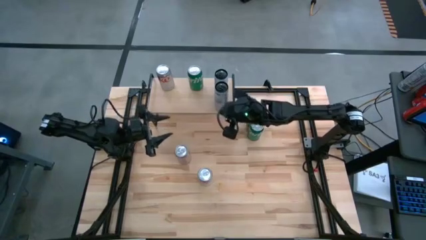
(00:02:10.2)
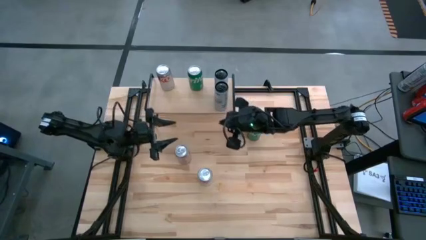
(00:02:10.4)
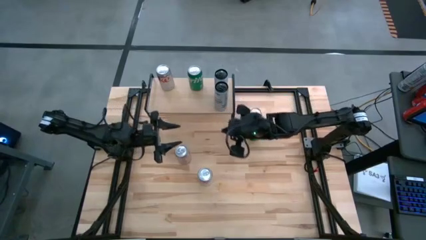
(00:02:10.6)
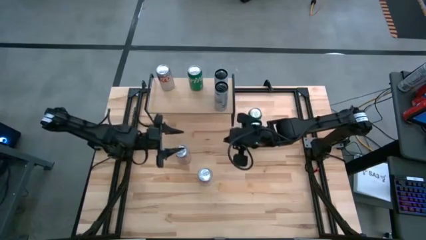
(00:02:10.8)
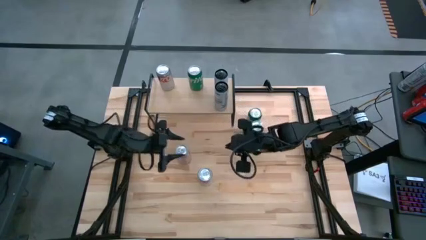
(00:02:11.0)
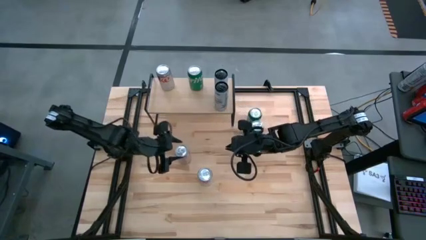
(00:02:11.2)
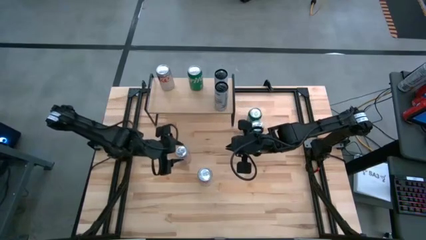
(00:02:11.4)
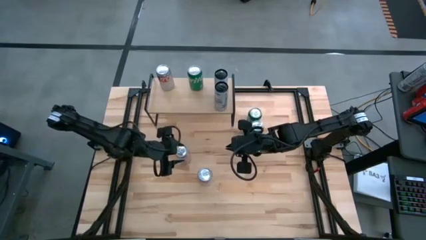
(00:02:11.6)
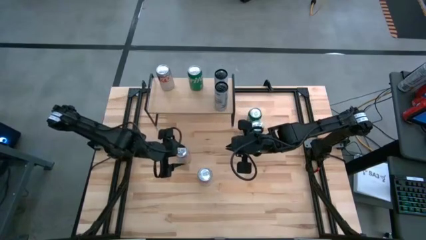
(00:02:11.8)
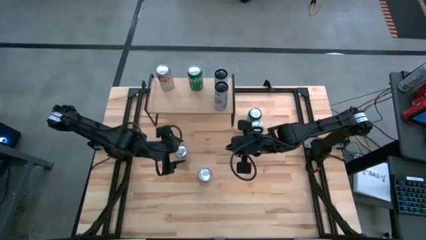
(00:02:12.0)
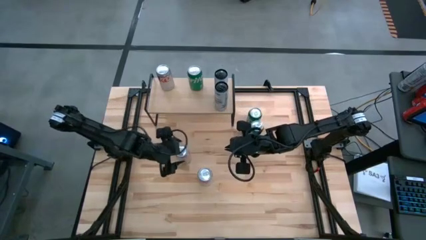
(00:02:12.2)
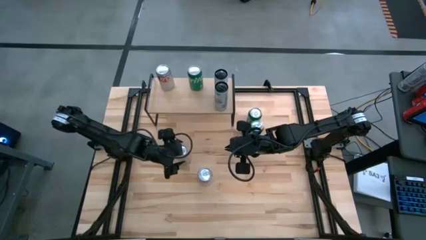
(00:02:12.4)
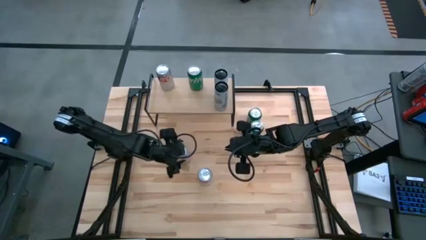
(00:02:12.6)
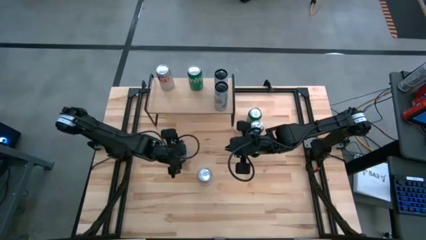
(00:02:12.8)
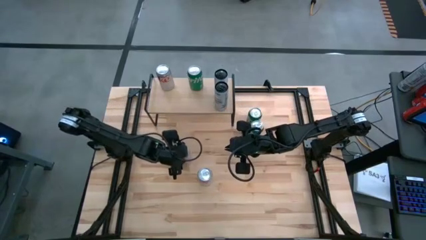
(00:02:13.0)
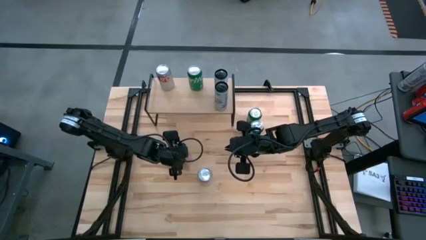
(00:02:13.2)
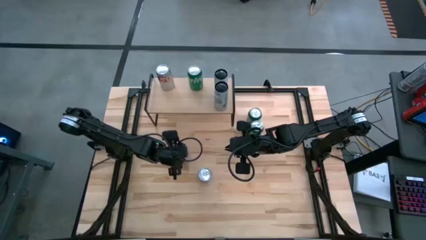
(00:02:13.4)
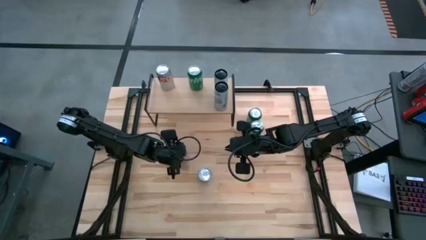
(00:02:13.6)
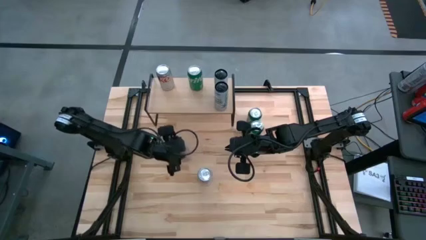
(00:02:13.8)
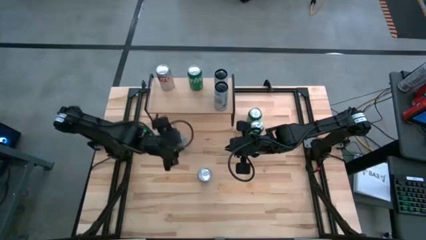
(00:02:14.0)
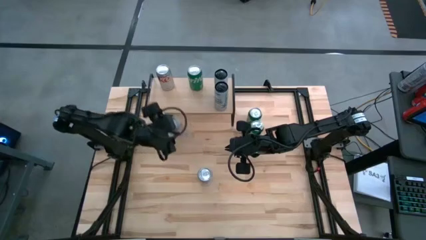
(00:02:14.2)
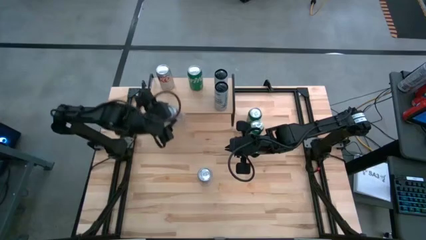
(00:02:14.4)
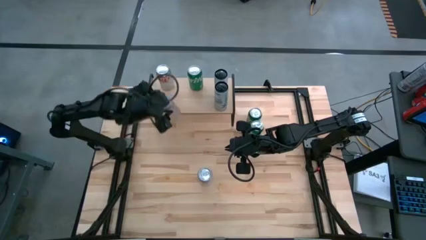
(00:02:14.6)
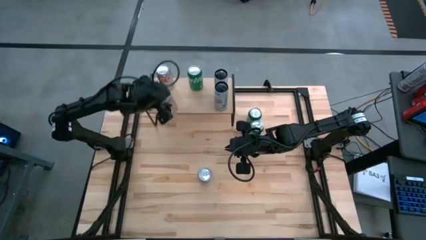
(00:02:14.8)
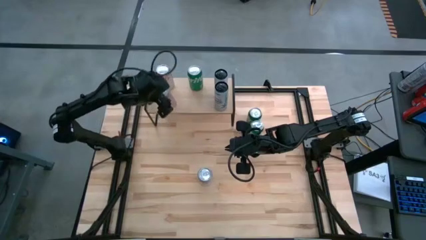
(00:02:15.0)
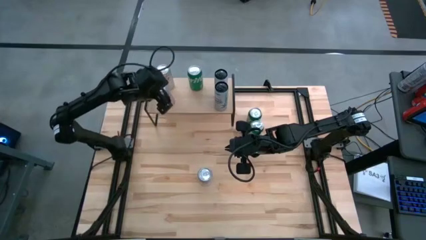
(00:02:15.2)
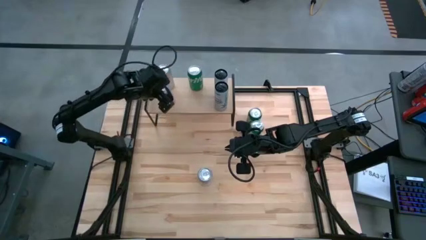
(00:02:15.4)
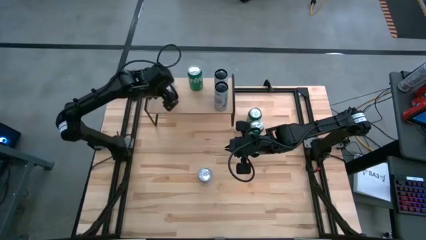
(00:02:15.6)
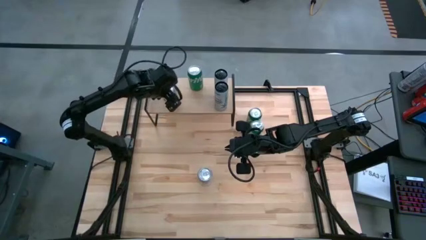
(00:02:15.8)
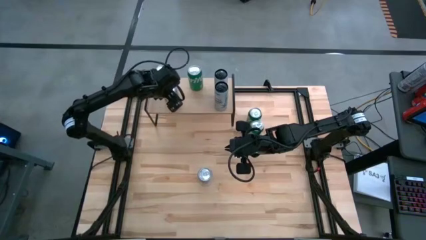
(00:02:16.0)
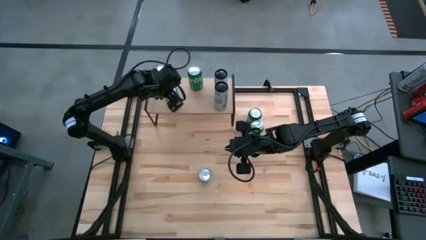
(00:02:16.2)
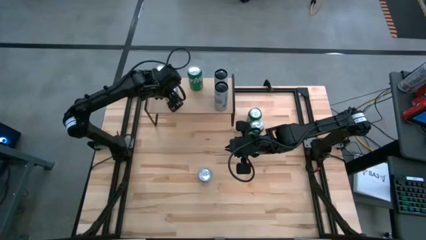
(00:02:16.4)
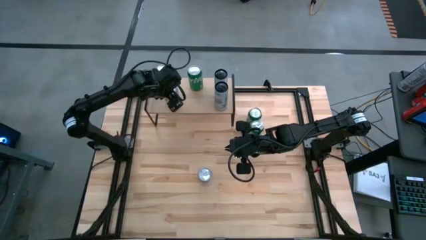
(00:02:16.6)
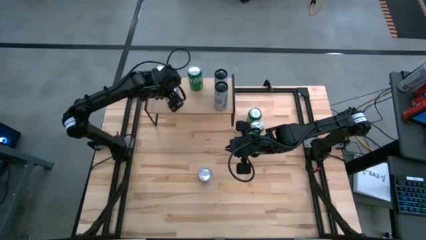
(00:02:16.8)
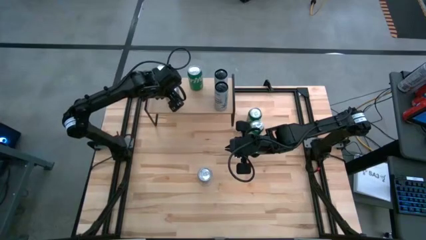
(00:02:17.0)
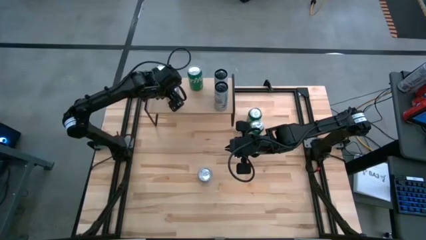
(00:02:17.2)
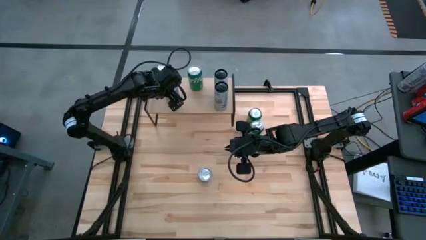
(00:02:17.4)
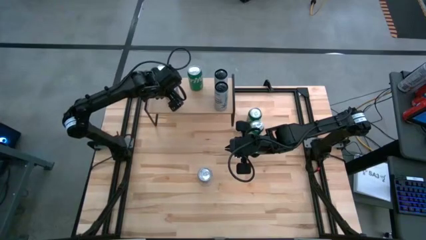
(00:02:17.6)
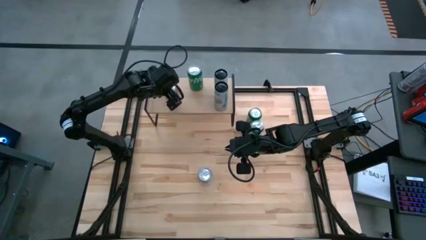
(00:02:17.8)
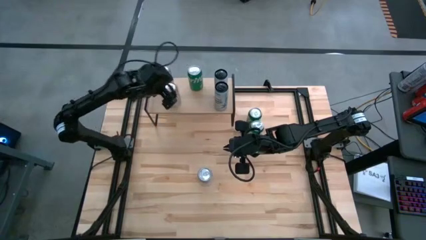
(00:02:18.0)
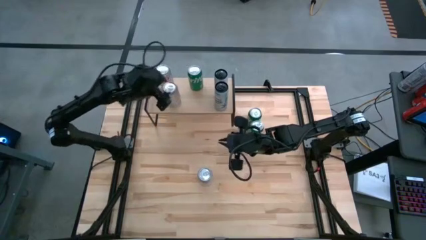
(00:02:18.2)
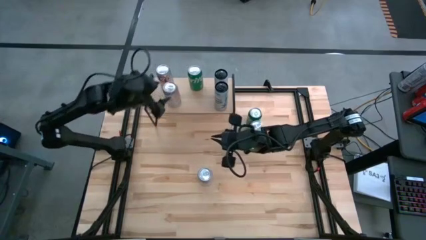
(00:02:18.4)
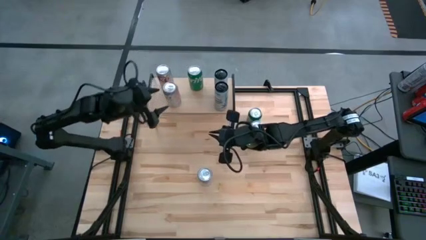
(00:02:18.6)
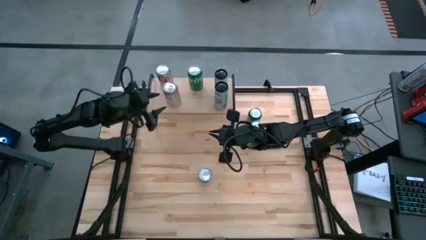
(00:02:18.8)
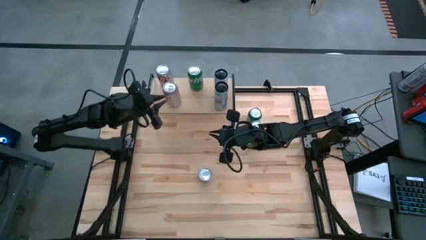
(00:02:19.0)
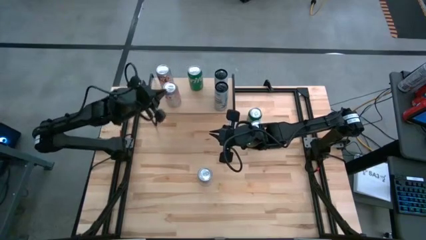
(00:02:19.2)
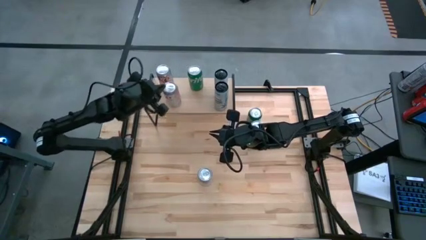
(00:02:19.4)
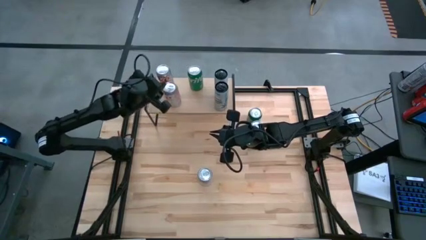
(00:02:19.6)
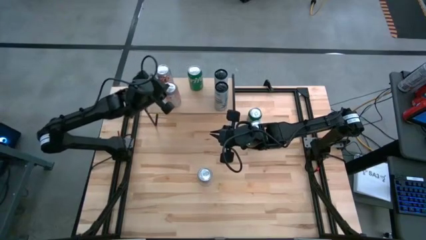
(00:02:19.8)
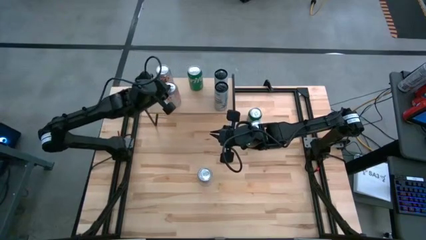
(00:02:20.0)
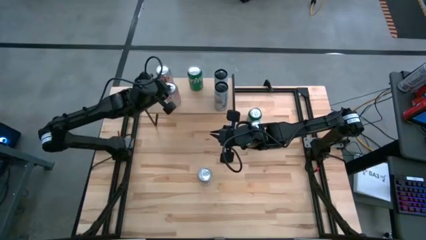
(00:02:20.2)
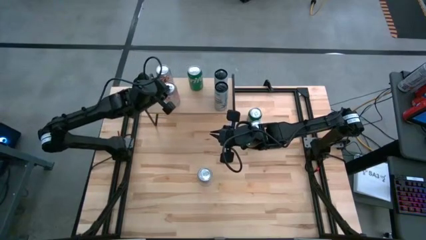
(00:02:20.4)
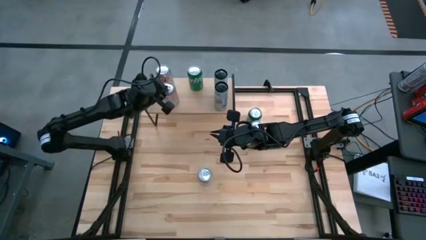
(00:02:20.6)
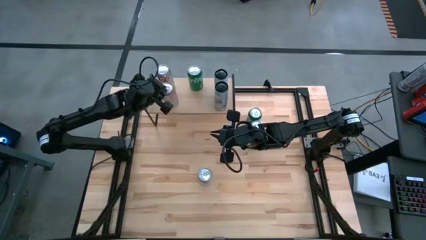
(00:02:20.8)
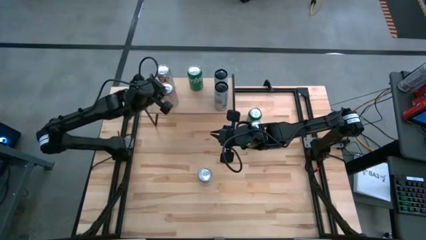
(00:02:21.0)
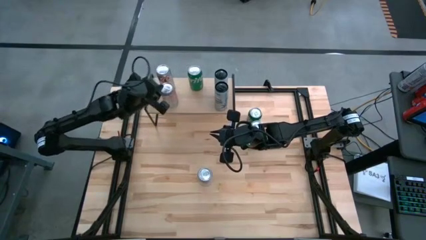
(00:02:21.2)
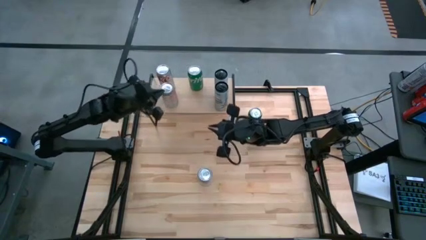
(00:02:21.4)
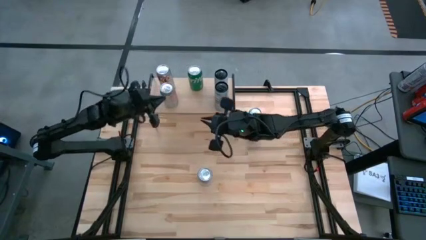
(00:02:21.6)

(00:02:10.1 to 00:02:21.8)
Task: Place canned beverage on shelf
Put the top red and silver soda can aligned with the other red and silver soda cans on the shelf

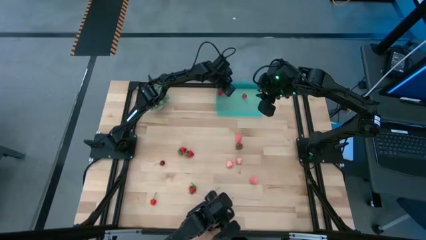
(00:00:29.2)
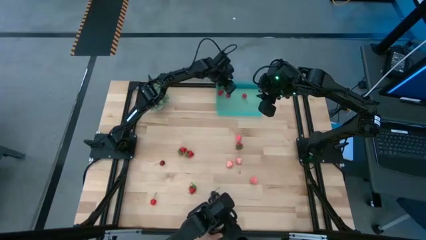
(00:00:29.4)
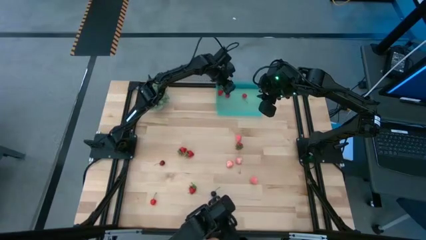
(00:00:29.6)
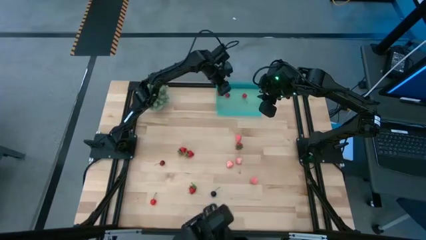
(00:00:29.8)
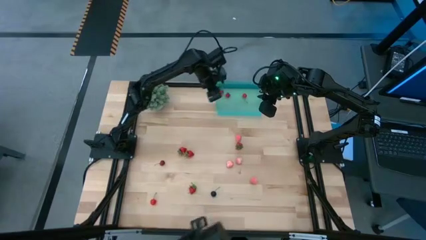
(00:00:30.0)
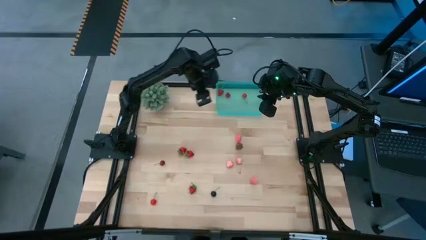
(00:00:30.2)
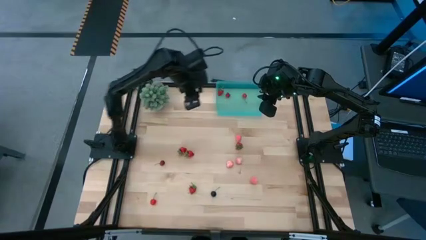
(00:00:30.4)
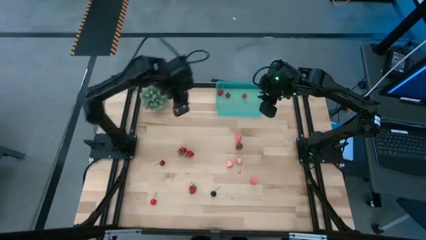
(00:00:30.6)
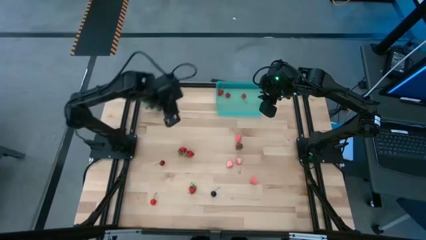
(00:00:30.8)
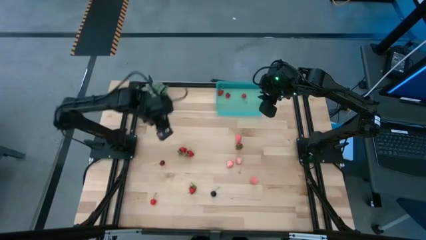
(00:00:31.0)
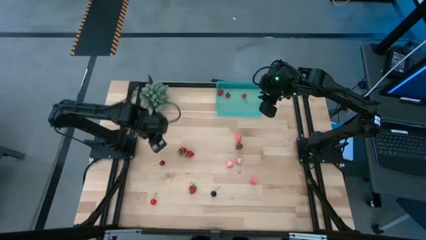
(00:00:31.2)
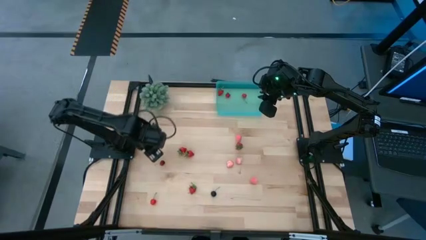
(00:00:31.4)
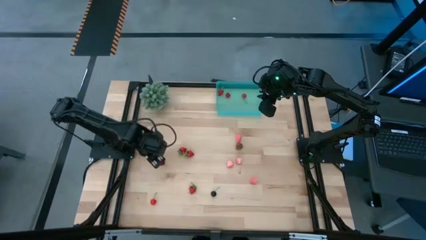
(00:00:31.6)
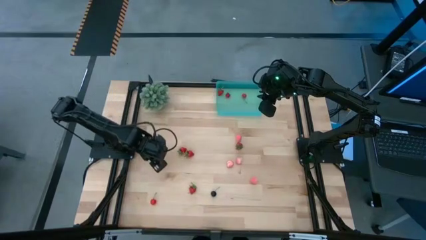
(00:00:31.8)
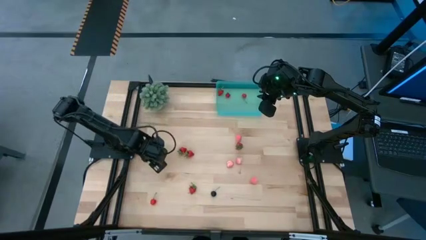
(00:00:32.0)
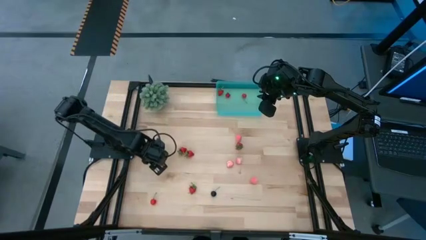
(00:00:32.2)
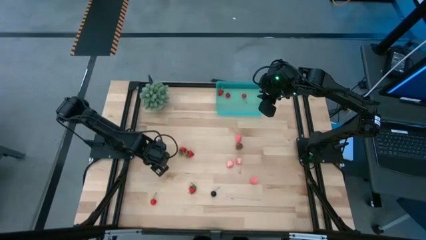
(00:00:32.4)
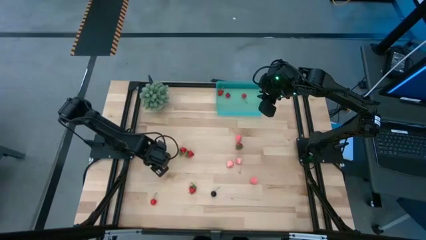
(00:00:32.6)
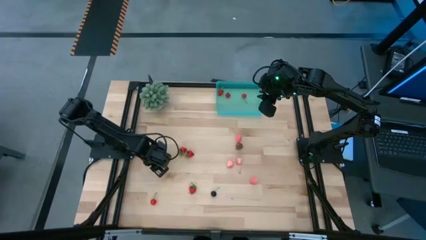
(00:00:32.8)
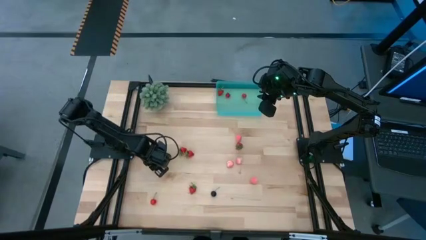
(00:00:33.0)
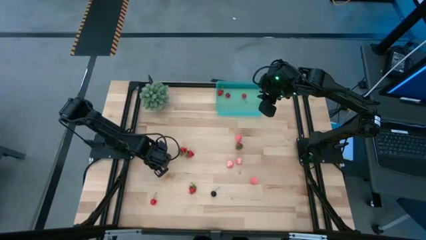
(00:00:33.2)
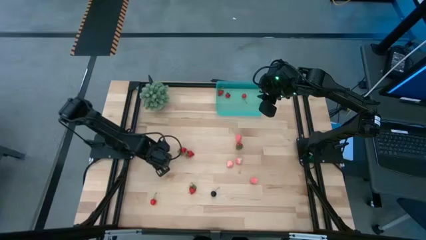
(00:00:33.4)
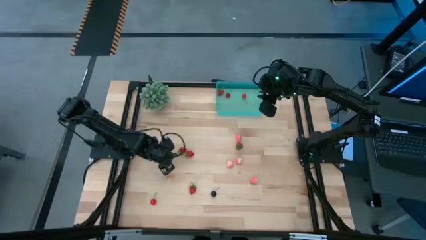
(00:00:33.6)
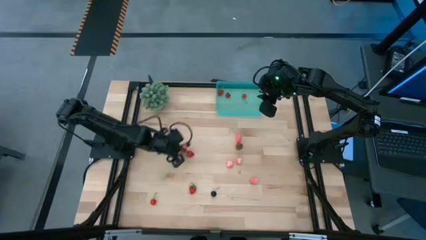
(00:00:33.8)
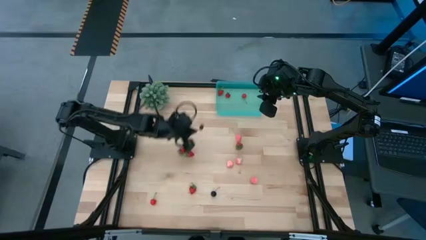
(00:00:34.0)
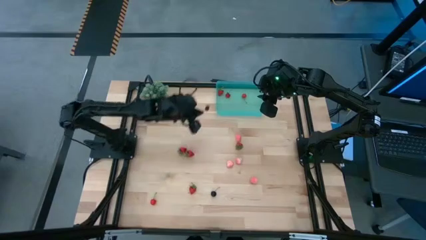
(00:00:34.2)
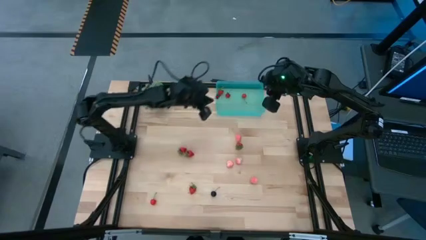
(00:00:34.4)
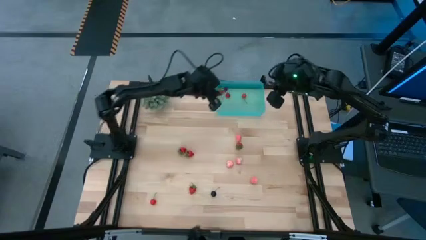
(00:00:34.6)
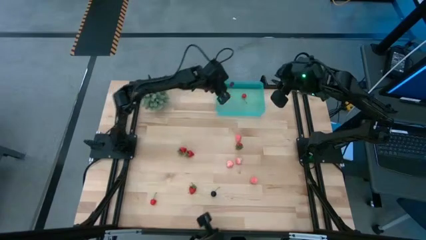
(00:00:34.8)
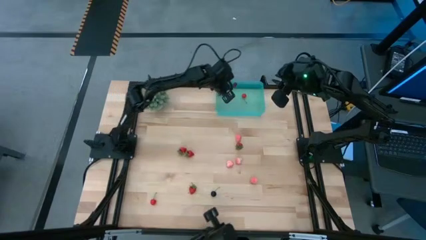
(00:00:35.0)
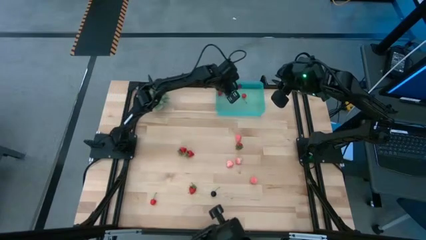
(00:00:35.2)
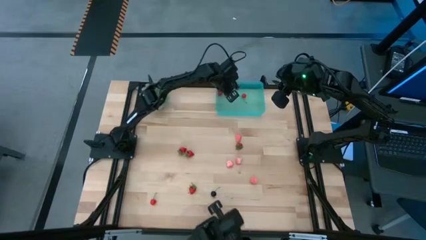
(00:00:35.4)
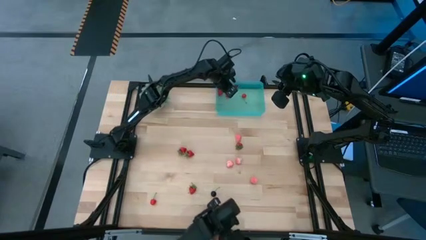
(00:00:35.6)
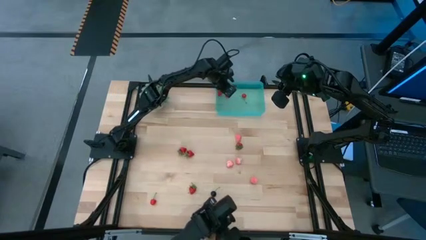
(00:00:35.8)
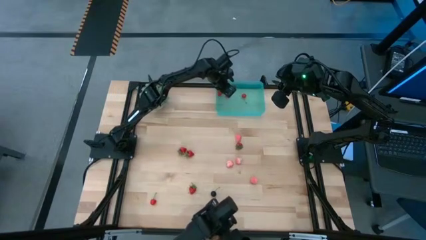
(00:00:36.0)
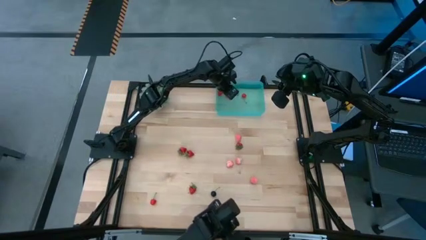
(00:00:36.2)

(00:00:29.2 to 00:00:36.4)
Task: Pick and placing Produce into tupperware
Put the cherry into the blue bin
